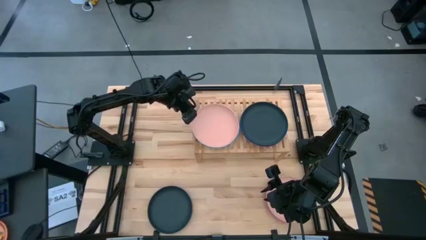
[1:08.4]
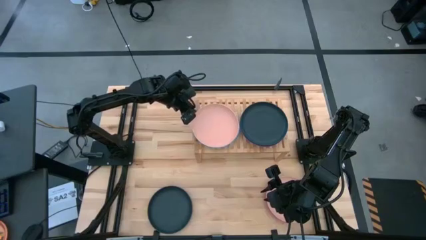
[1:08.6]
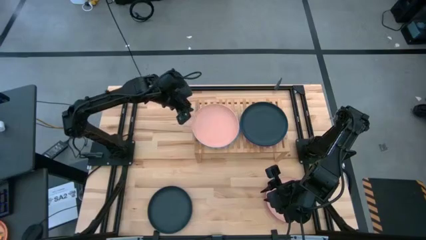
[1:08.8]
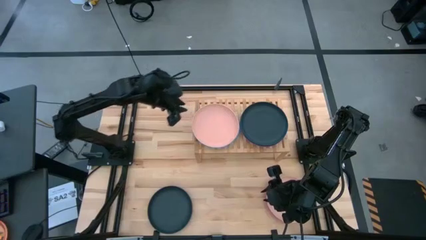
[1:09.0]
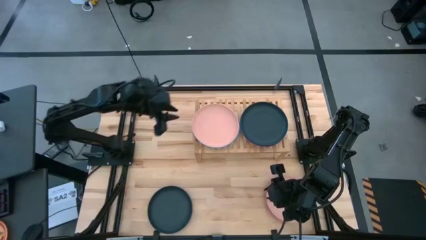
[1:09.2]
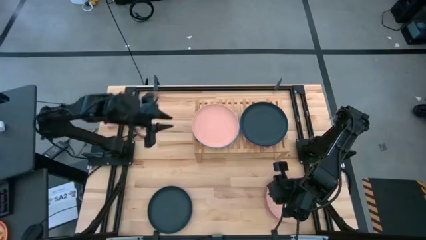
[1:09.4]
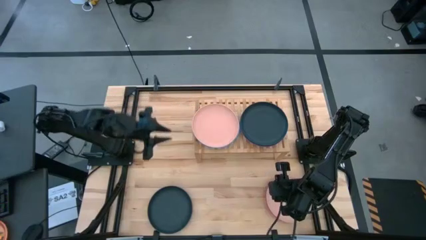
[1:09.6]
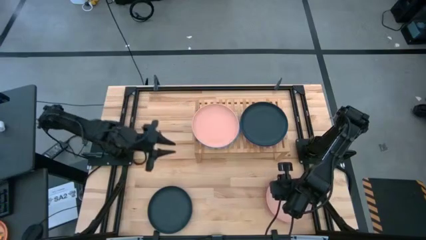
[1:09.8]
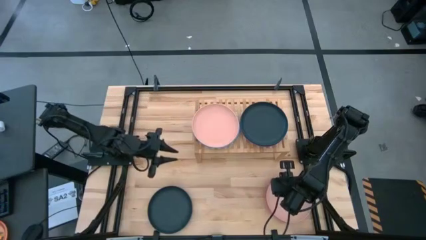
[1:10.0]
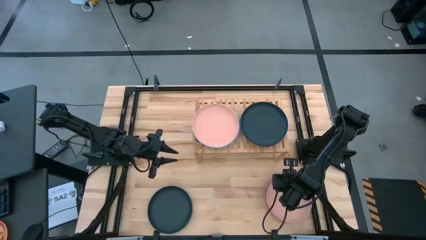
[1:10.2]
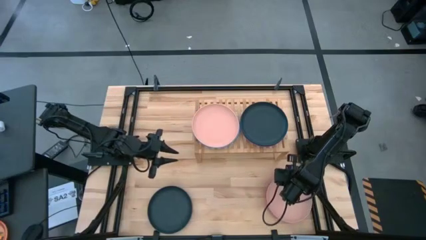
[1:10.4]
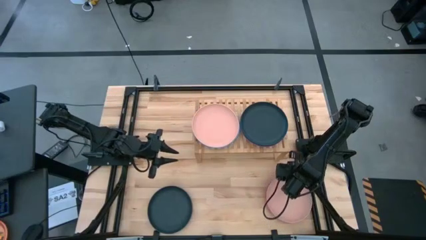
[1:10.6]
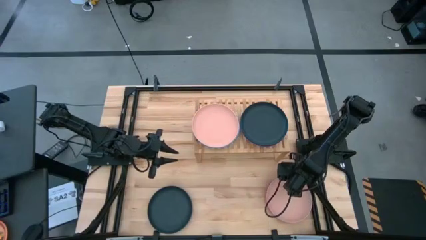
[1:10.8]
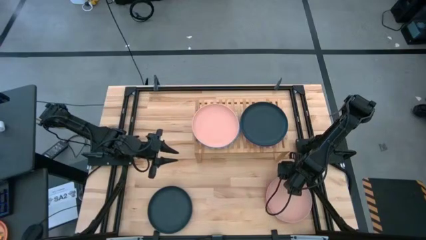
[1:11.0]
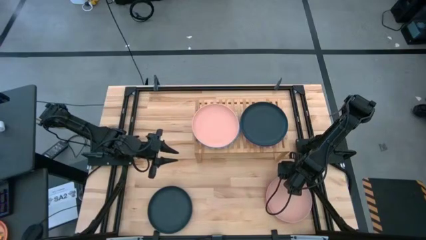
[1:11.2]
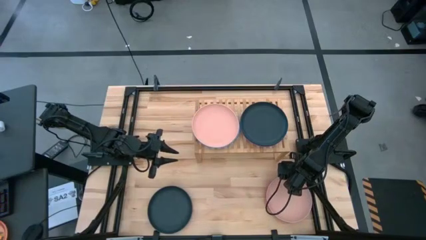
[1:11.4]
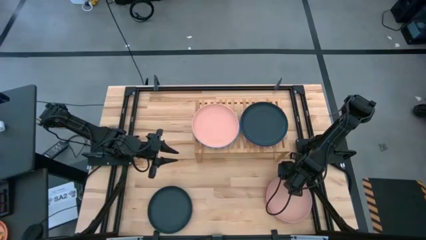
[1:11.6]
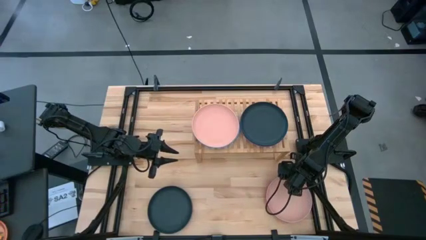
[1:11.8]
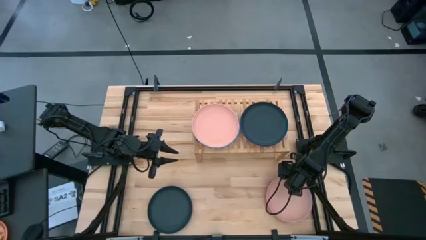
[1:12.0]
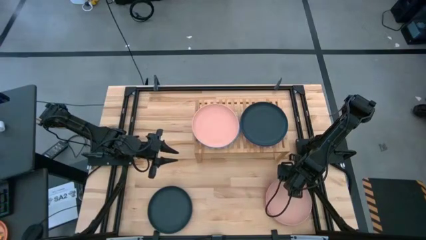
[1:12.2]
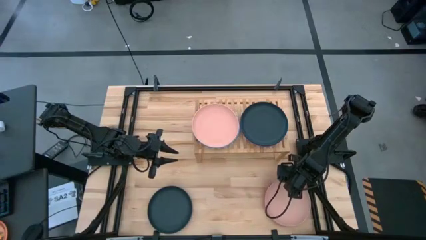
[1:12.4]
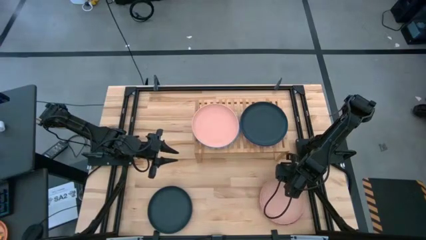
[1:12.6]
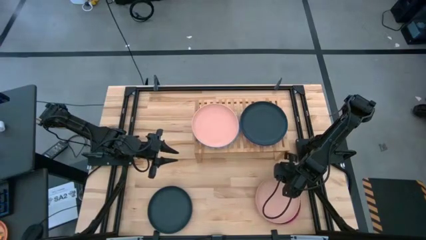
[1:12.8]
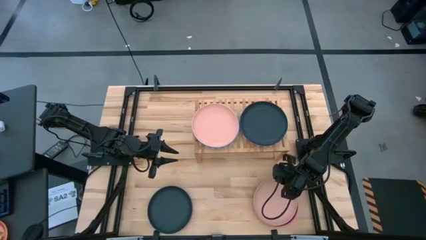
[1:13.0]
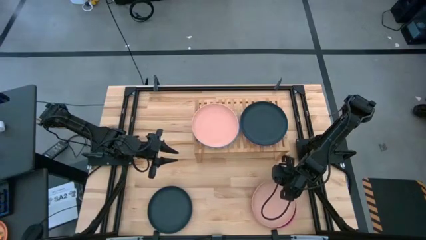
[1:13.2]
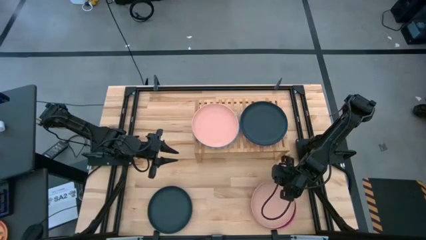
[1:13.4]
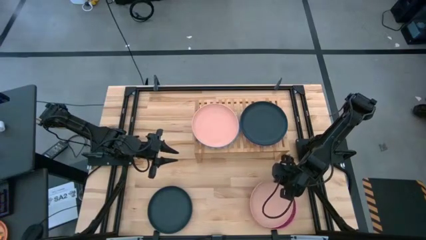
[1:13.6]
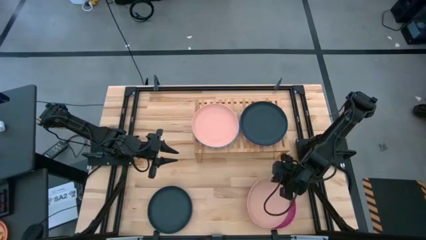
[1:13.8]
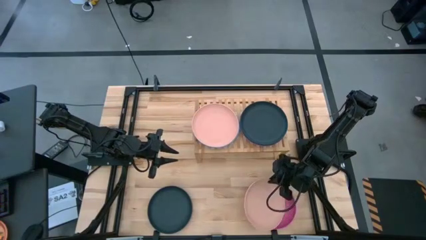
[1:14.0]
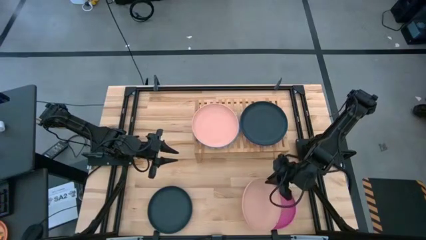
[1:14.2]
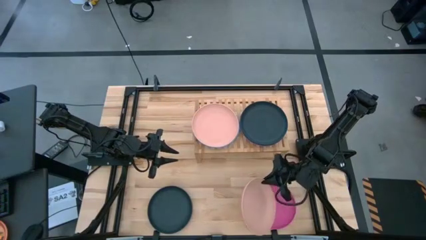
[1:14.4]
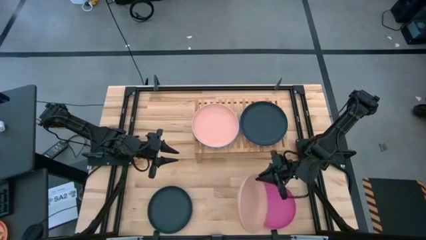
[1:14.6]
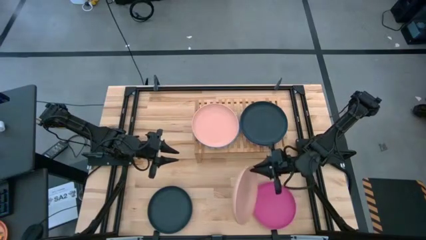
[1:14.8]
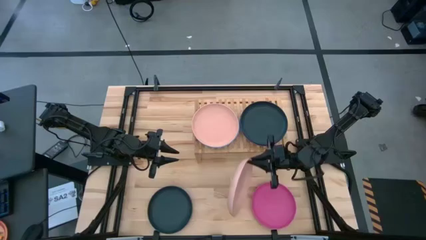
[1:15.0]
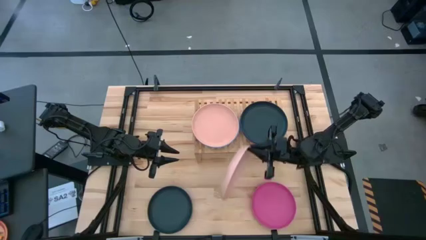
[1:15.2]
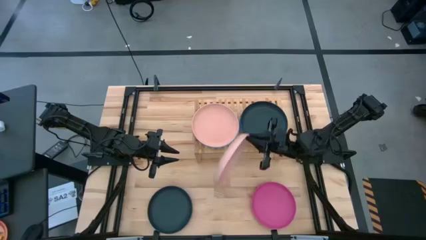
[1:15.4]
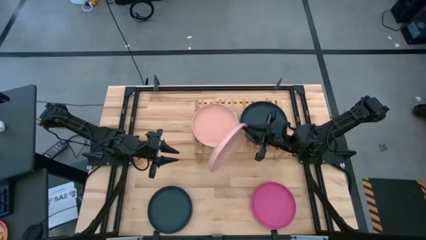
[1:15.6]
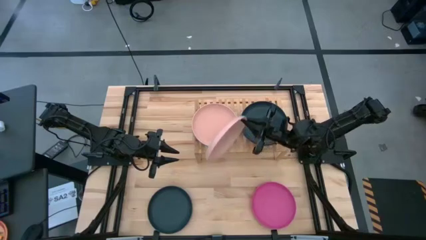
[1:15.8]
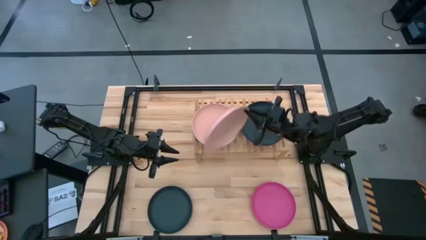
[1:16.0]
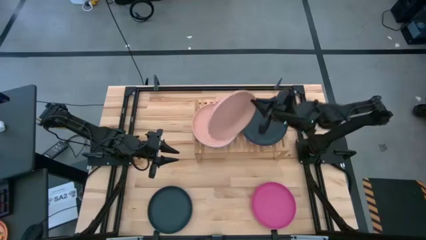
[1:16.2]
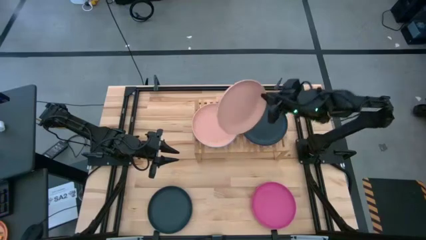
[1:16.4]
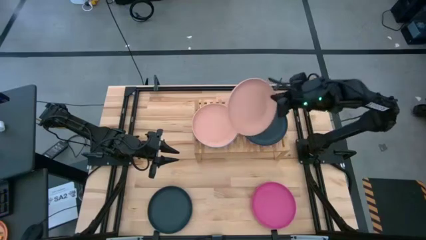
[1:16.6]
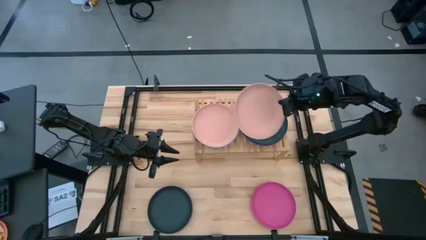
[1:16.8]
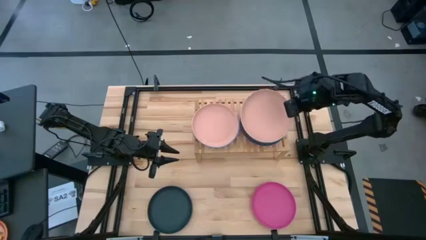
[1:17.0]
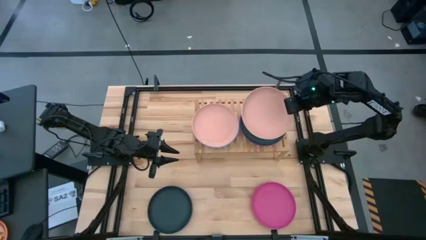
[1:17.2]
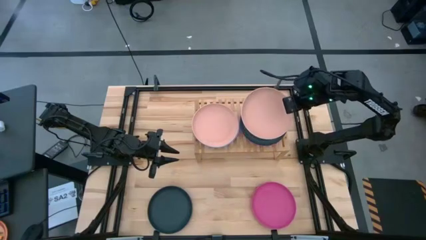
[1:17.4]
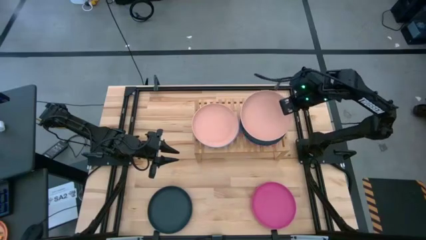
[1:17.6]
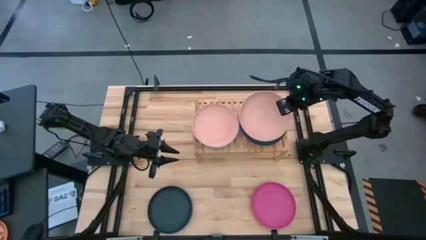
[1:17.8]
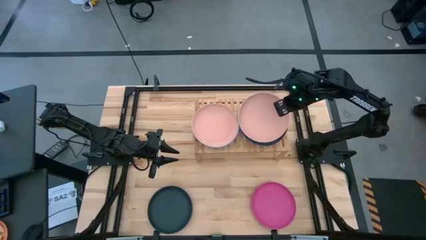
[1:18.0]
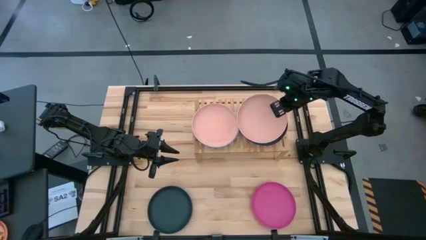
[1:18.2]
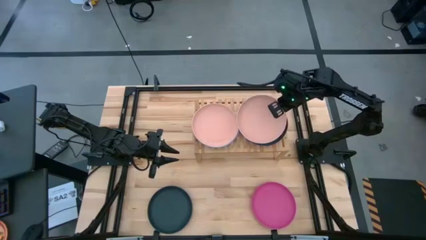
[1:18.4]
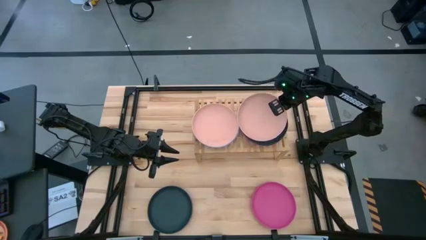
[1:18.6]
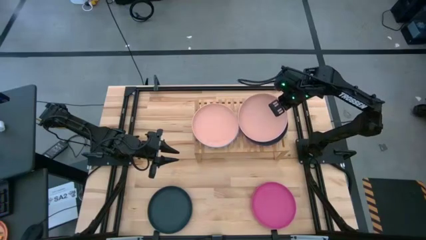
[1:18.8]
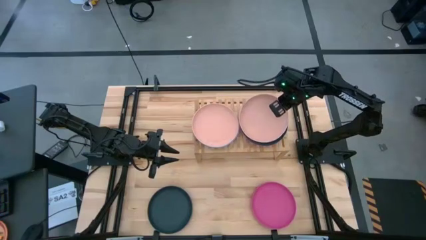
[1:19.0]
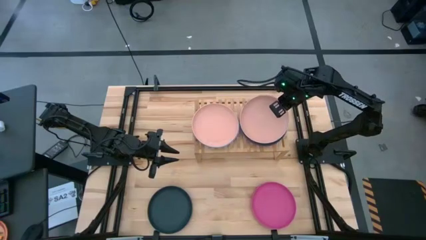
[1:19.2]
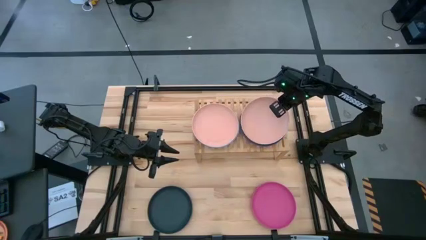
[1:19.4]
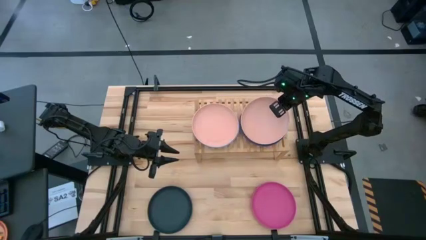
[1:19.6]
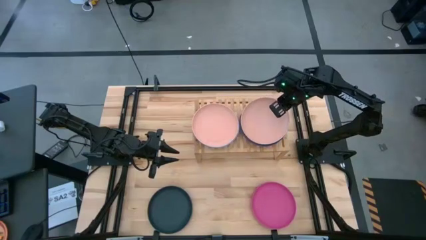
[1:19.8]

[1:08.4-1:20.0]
Task: Place and stack plates onto a shelf
Stack the brown plate on the top of the black plate on the shelf

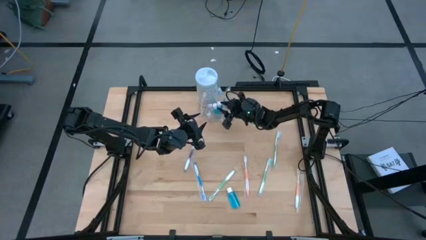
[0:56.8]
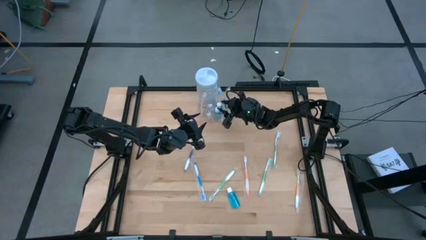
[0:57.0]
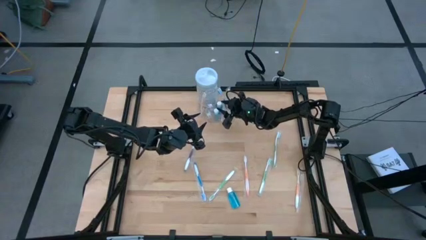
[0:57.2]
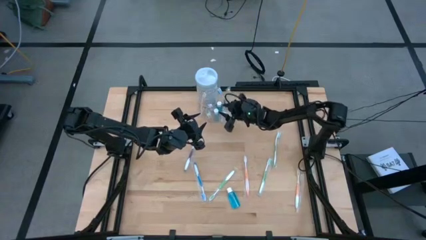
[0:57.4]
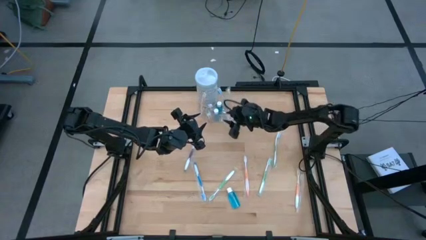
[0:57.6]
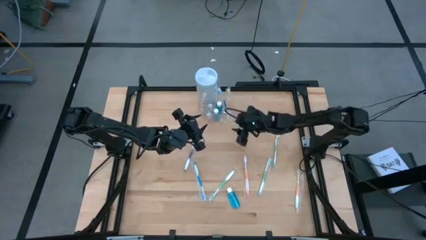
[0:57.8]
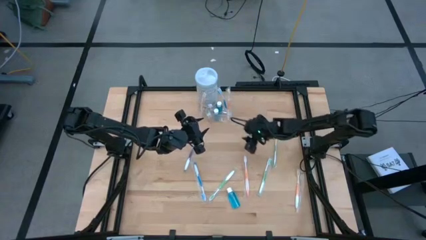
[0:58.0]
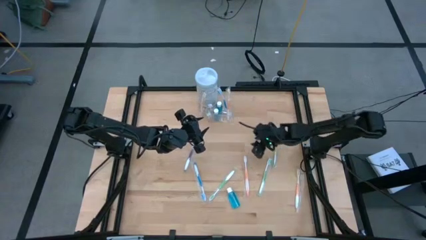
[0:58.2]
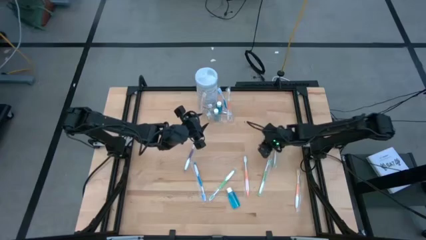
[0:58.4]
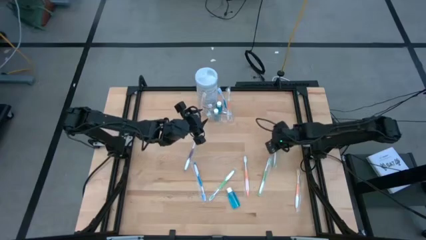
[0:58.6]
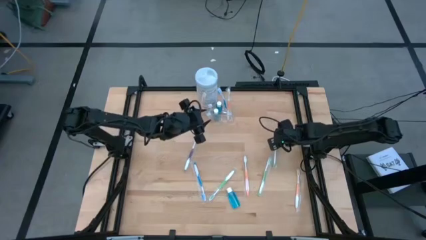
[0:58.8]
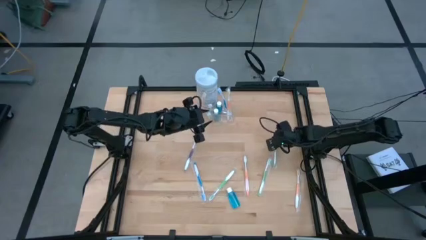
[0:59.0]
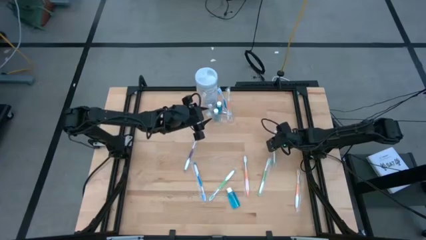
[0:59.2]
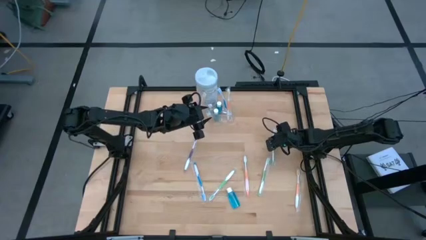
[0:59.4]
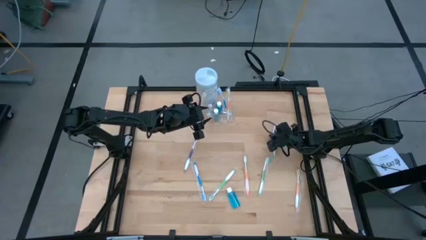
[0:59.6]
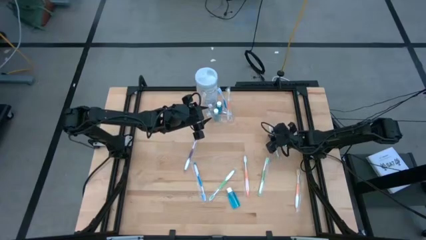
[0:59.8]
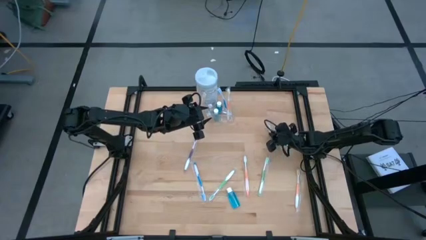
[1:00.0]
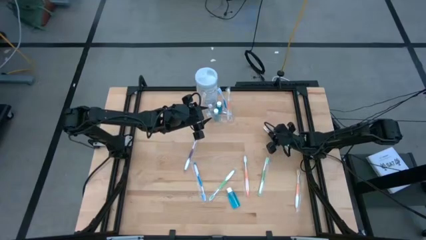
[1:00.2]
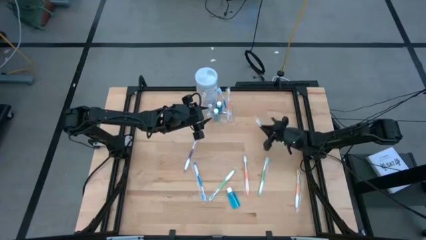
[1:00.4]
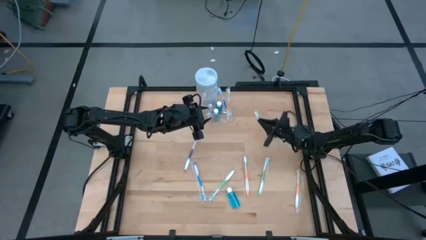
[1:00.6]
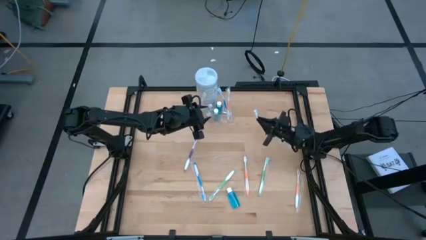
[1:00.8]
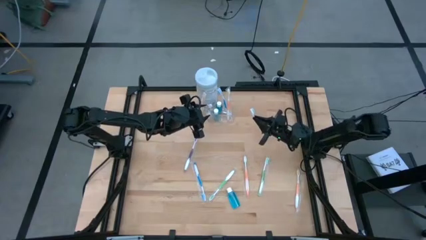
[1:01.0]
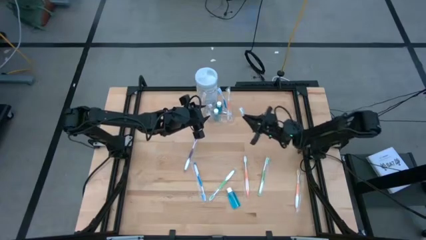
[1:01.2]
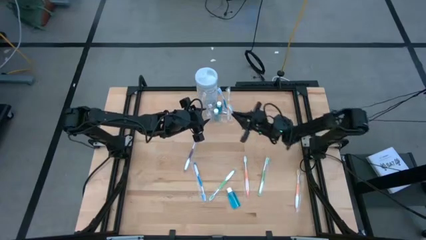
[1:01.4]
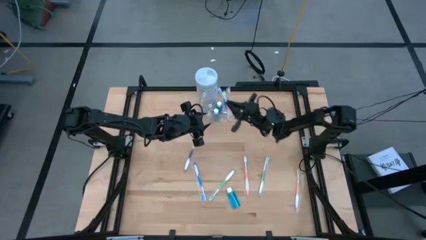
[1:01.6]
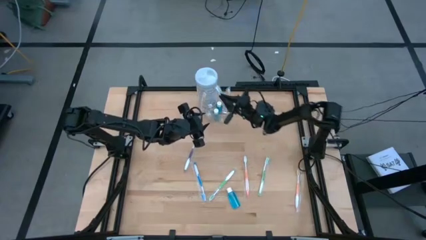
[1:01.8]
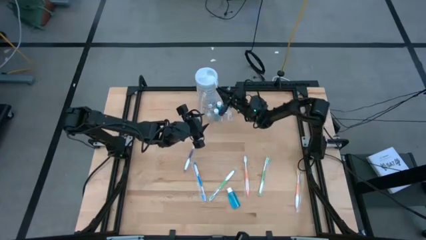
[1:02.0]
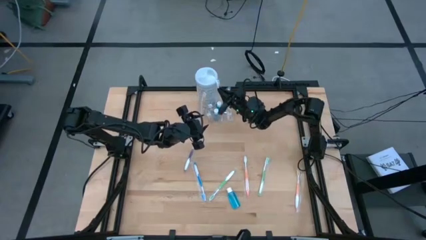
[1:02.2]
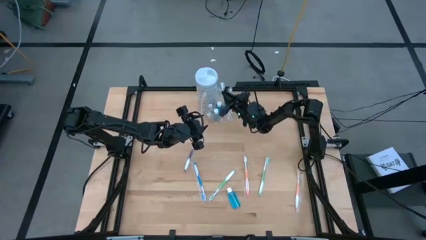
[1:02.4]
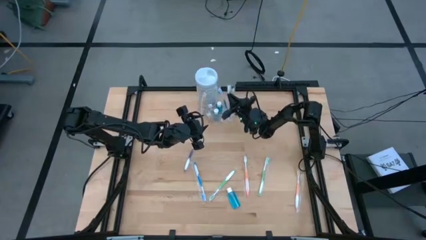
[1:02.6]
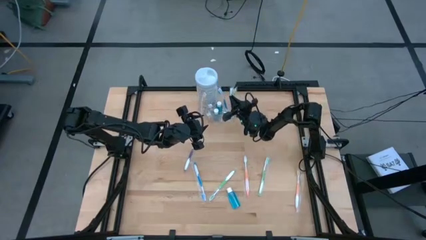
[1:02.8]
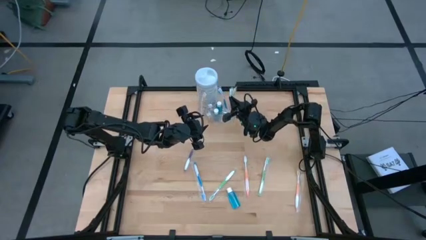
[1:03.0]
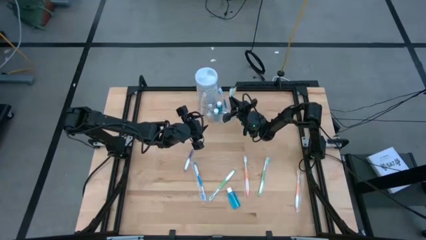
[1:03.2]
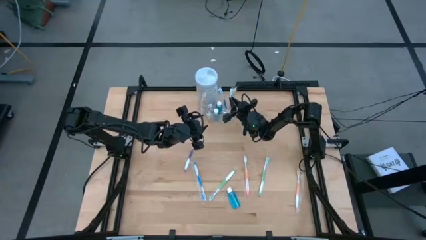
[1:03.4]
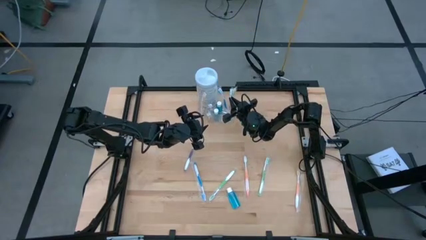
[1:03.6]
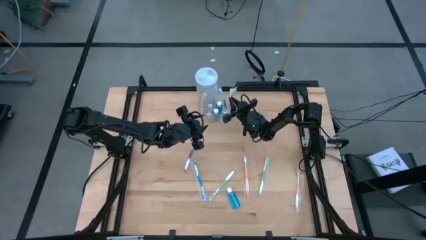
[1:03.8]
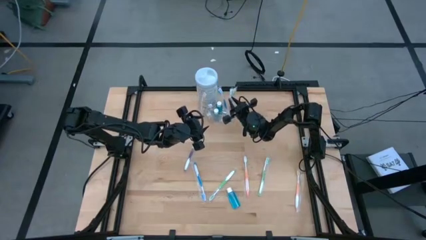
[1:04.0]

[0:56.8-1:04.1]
Task: Pick & Place toothbrushing station
Put the green toothbrush into the transparent organizer
